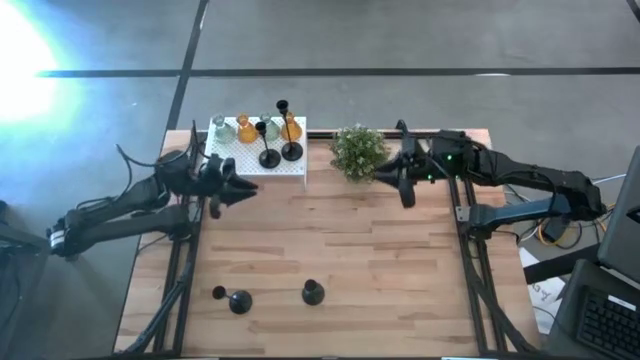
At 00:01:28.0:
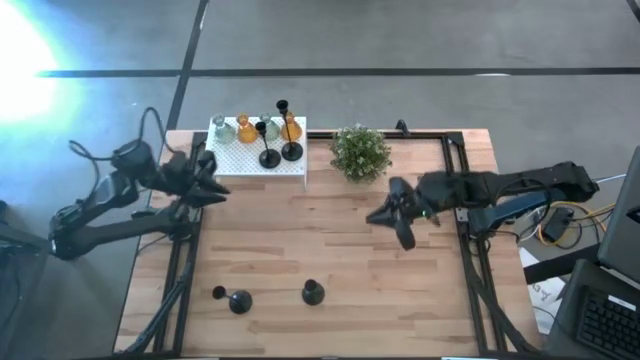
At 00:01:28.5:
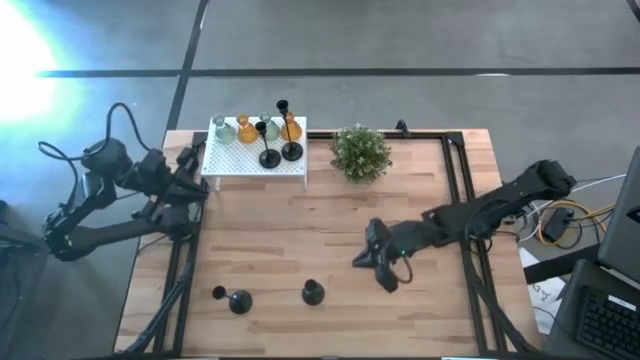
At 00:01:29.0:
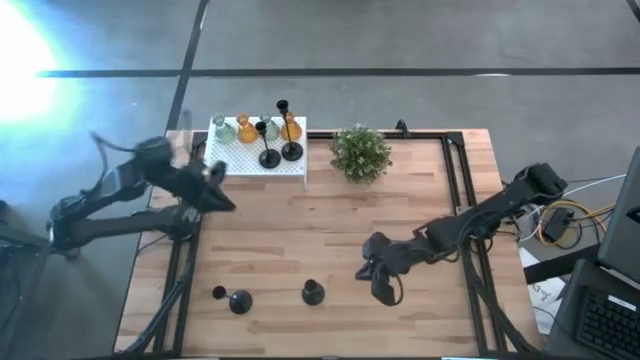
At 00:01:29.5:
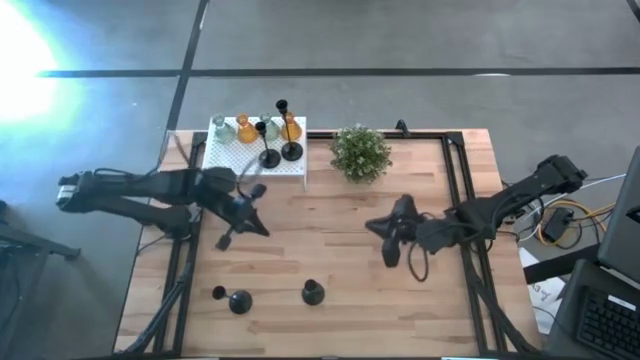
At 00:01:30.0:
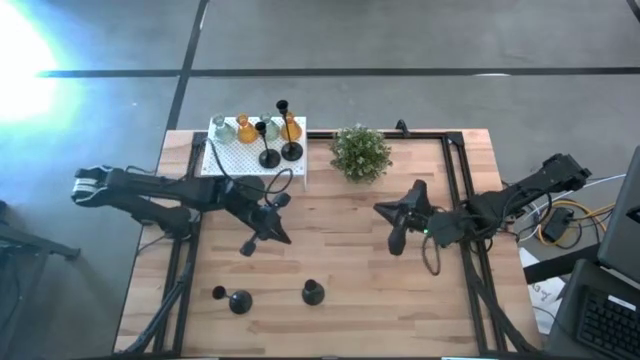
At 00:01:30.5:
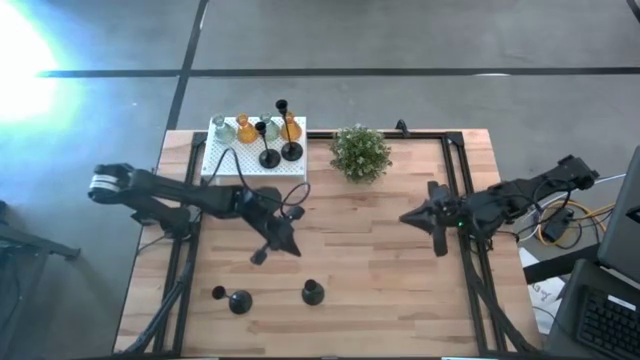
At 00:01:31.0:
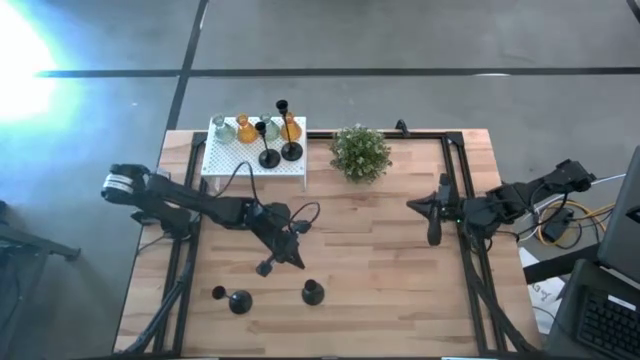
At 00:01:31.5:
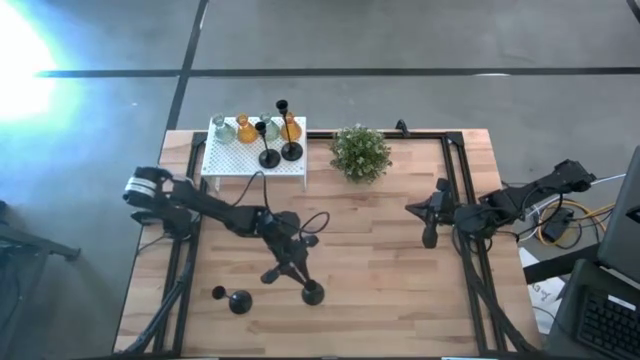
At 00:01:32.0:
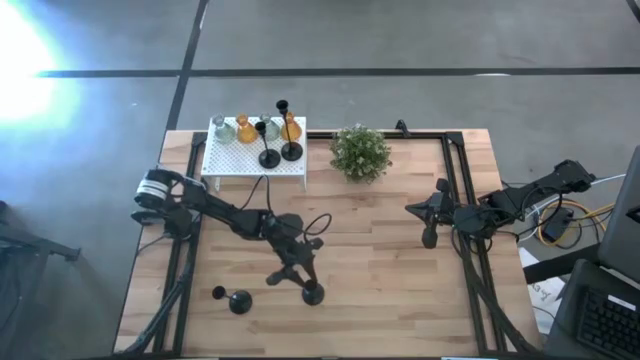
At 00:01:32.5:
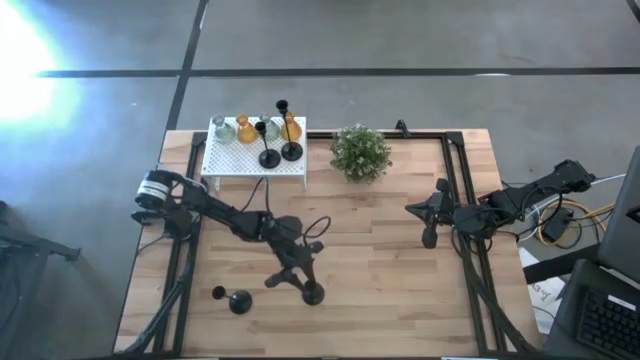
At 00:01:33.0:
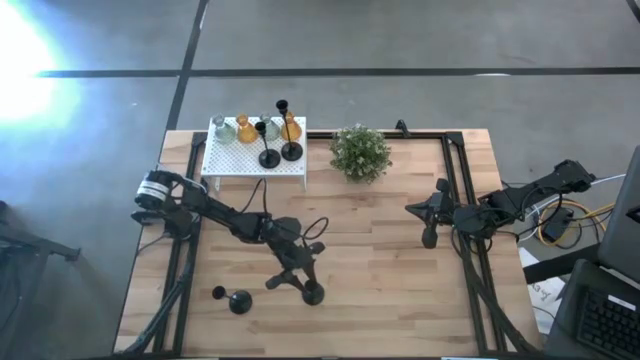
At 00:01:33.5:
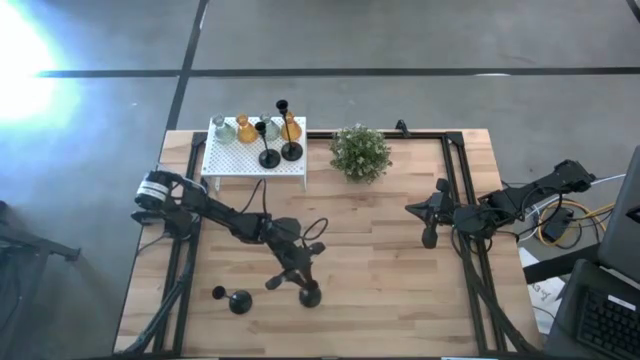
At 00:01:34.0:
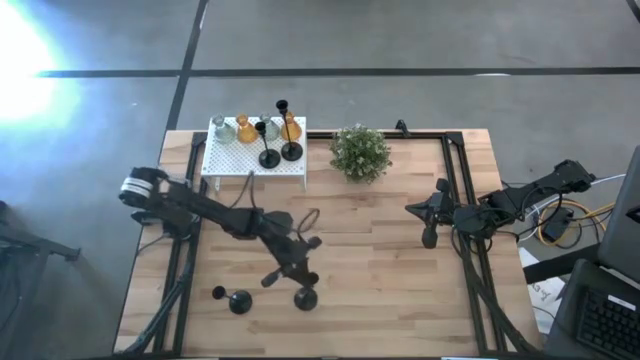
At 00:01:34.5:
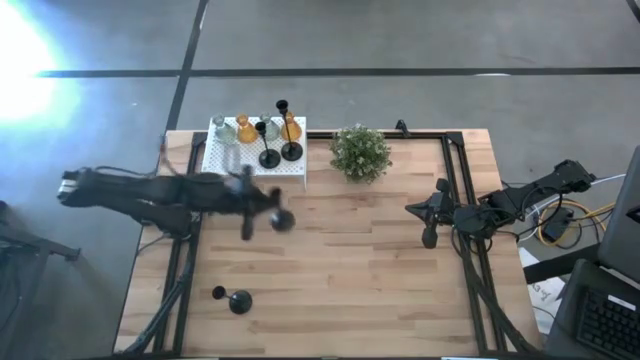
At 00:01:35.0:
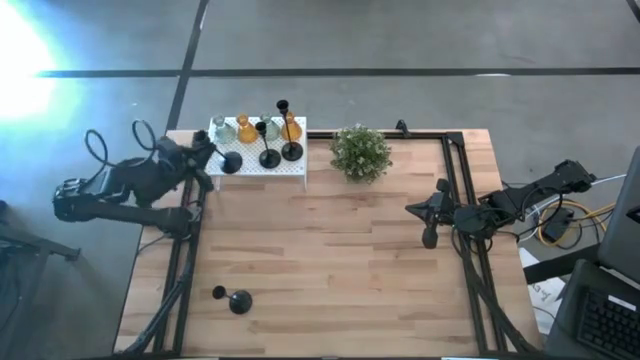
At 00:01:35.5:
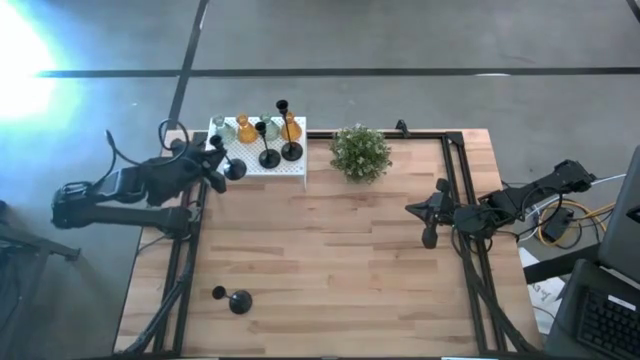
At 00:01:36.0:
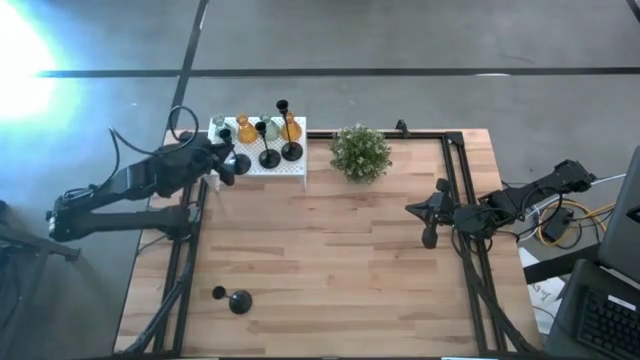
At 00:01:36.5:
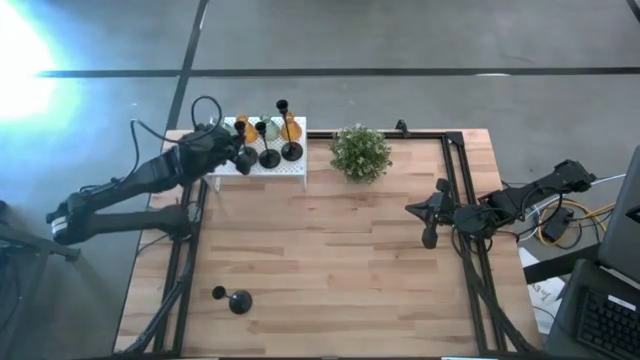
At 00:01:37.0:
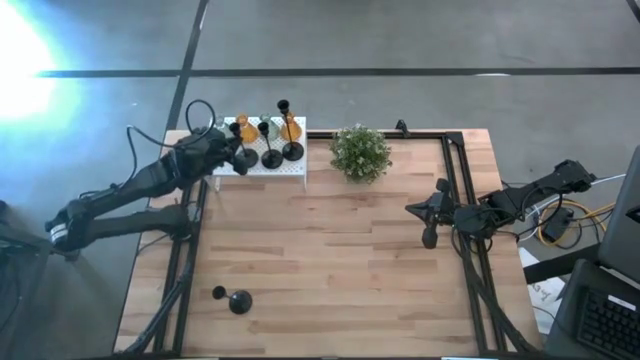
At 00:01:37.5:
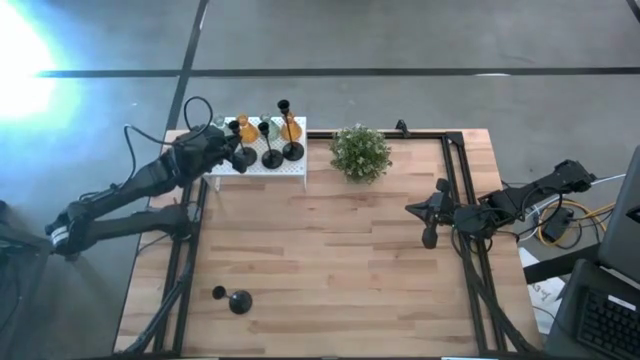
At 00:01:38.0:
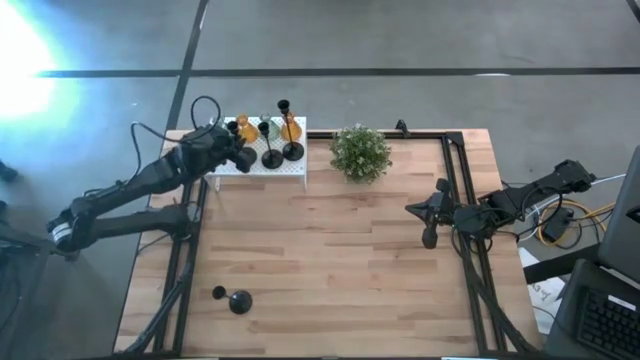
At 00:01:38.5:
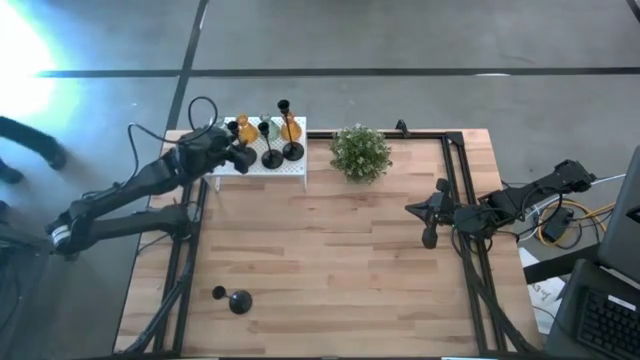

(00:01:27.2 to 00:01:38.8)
Task: Pick & Place candle stick holders
Put the small black candle holder on the shelf

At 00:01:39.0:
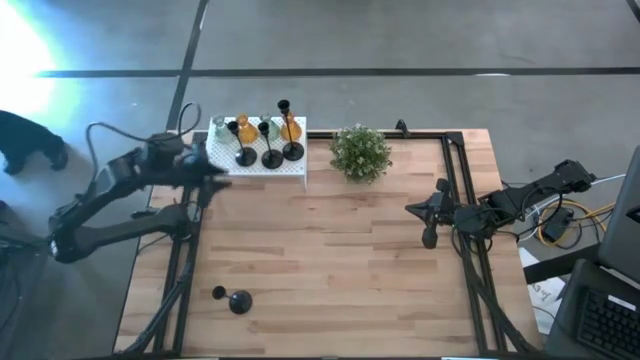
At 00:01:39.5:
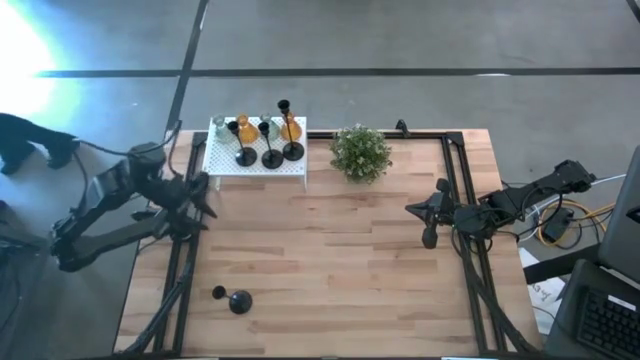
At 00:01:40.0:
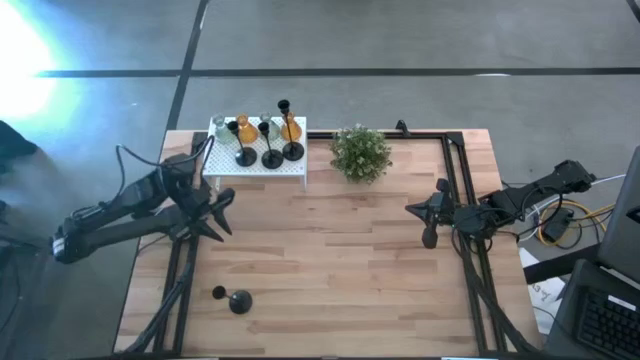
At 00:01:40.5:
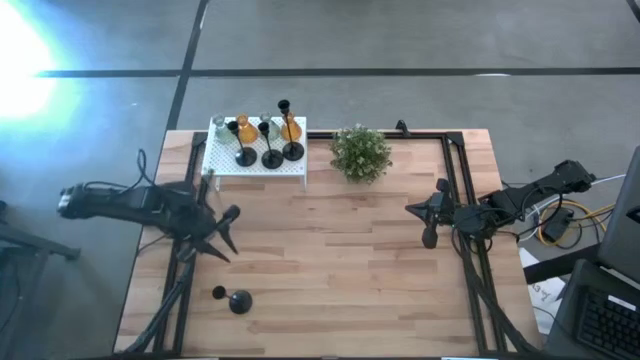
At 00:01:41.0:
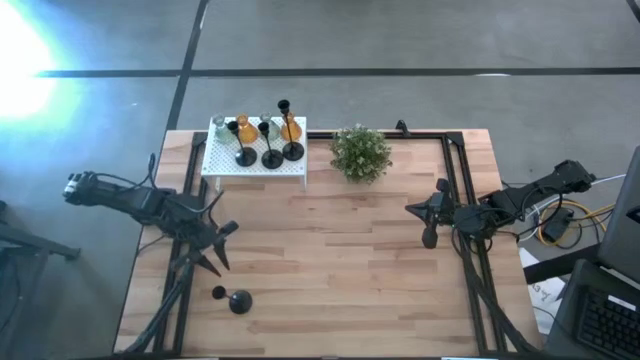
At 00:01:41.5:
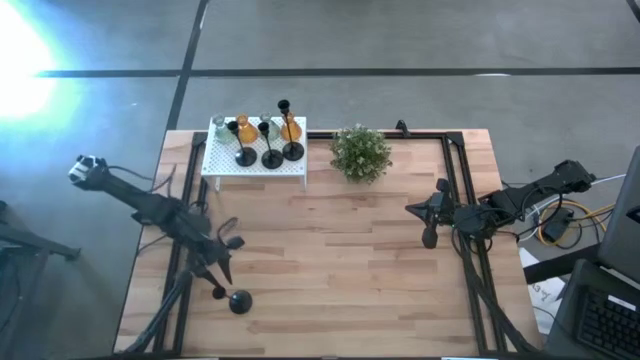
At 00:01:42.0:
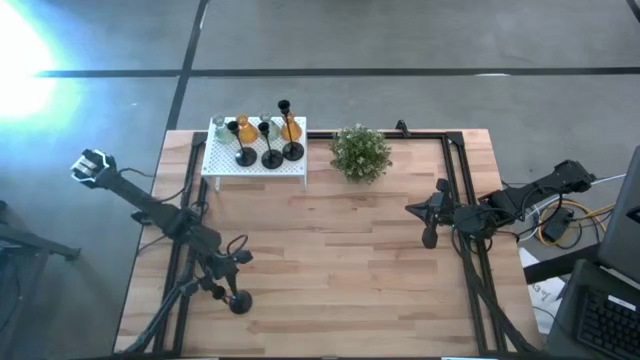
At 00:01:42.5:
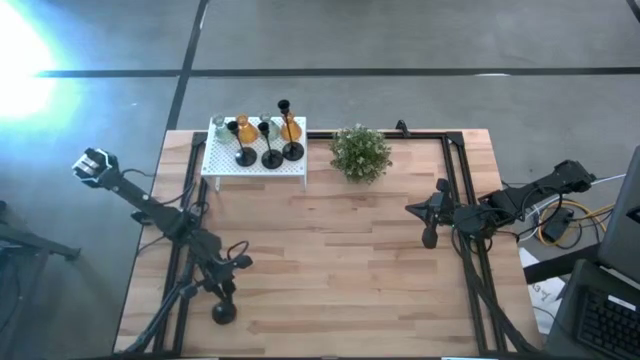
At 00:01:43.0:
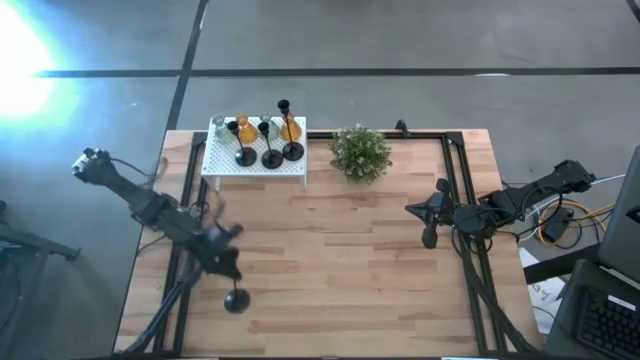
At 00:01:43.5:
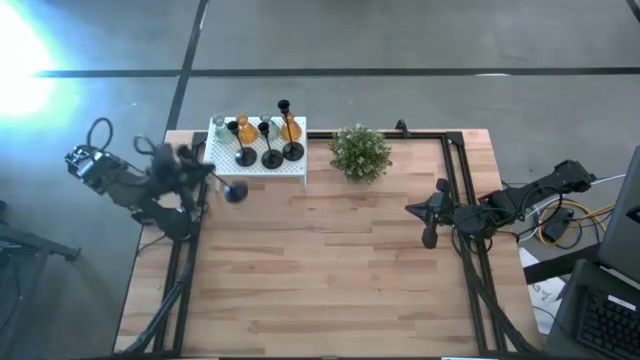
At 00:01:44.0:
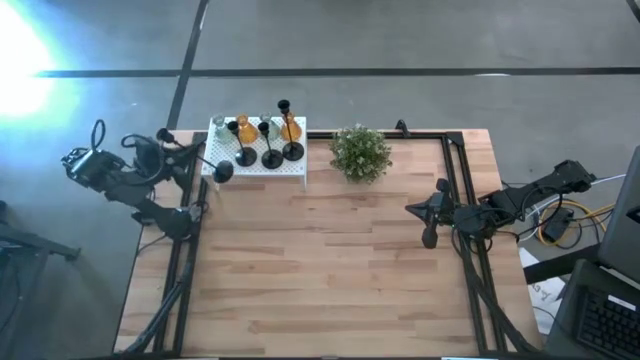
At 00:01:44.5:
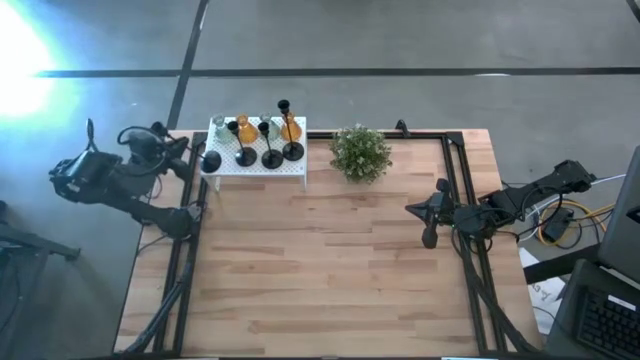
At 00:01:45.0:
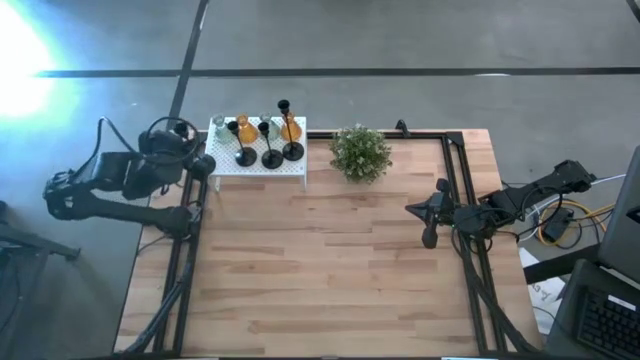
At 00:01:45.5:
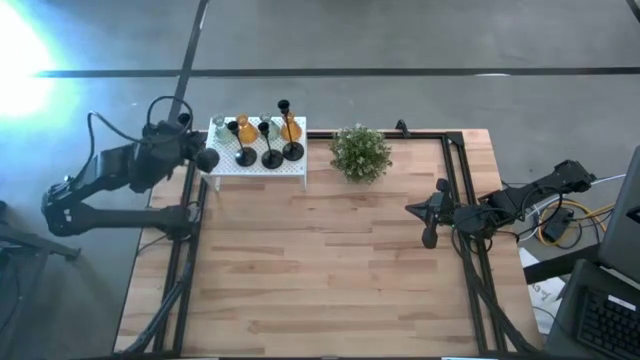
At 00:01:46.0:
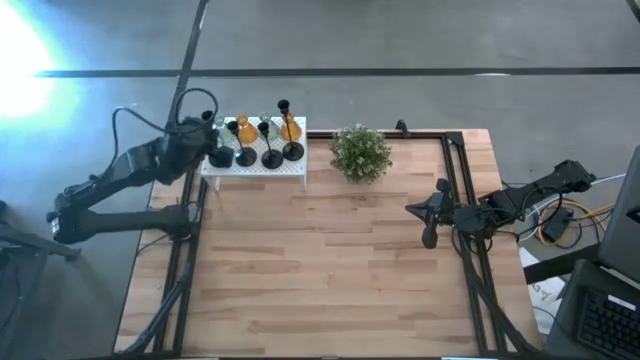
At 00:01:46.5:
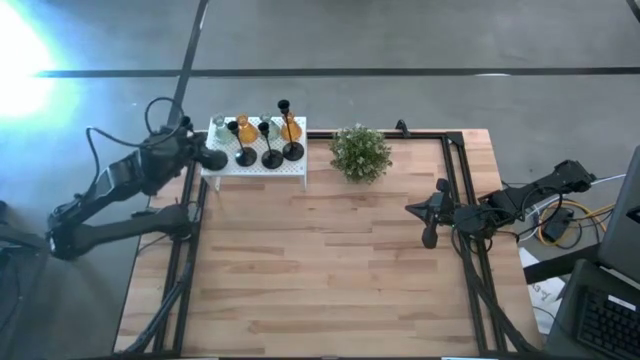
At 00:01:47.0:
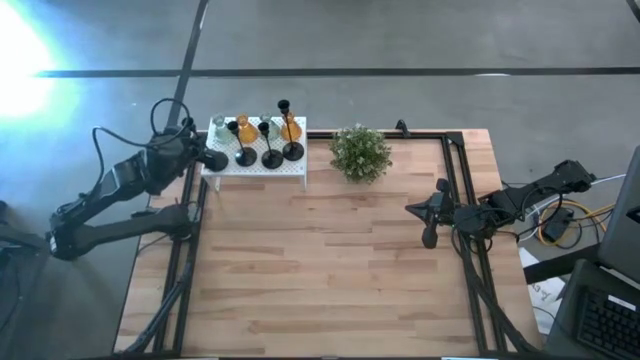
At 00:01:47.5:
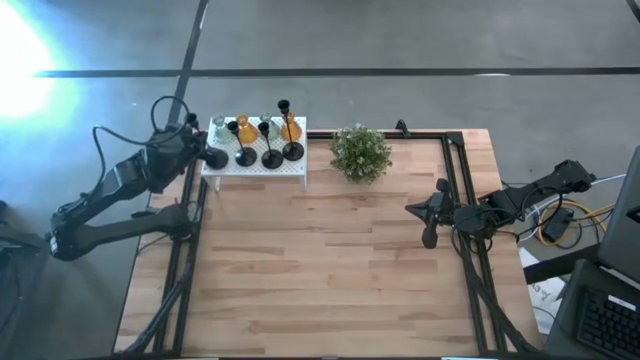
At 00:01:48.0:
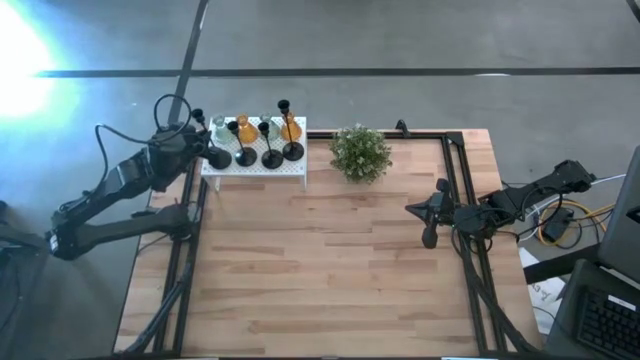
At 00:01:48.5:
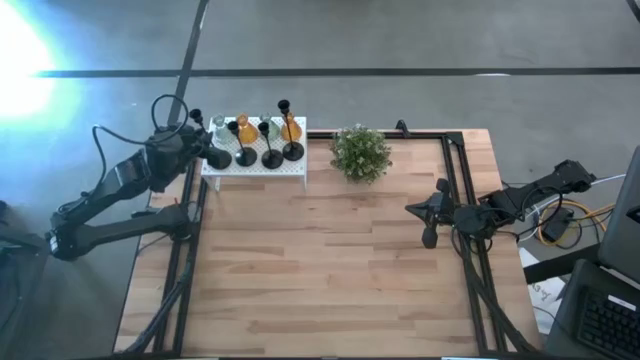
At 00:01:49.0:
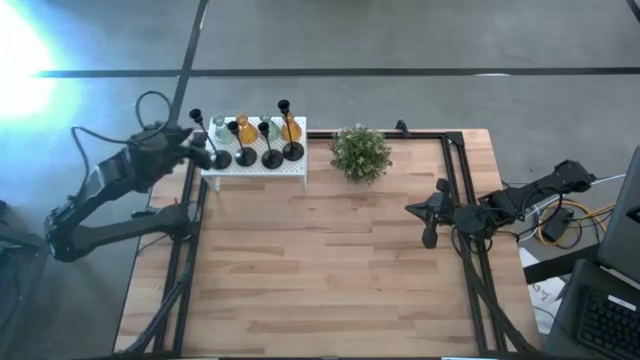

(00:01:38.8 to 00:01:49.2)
Put the large black candle holder on the shelf
